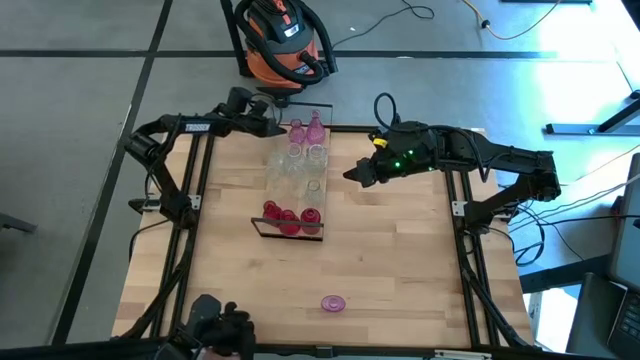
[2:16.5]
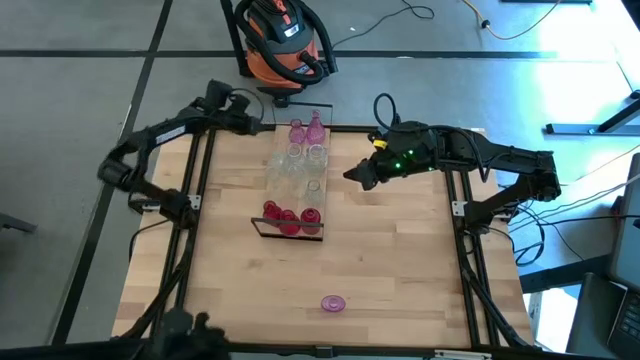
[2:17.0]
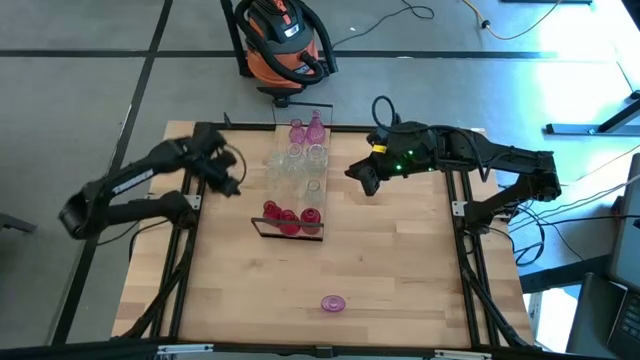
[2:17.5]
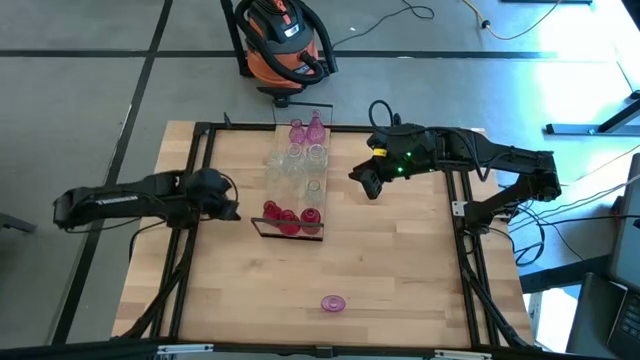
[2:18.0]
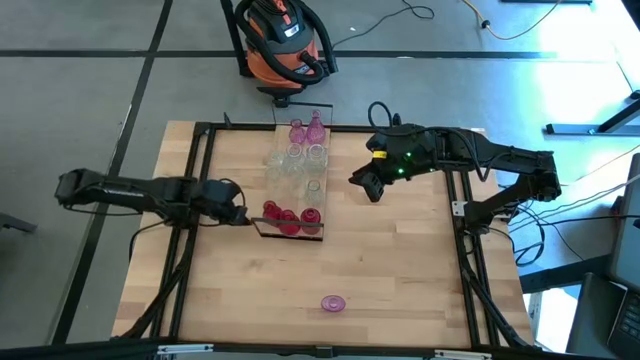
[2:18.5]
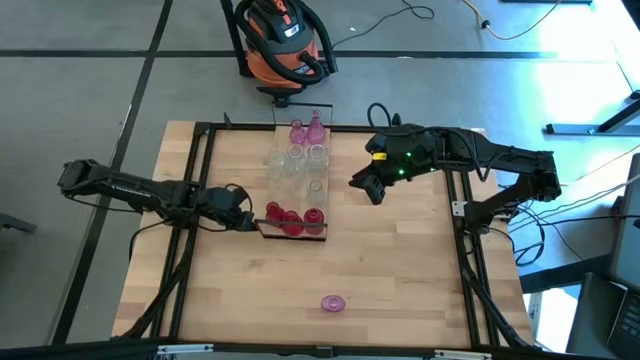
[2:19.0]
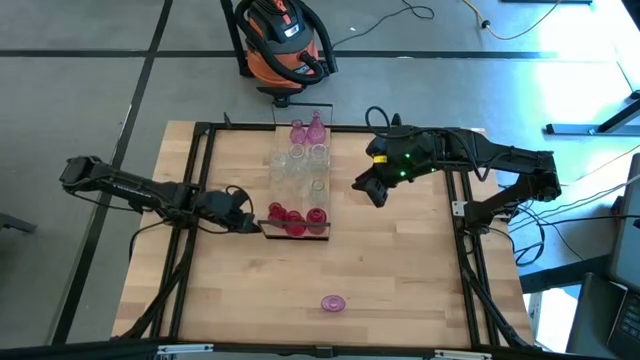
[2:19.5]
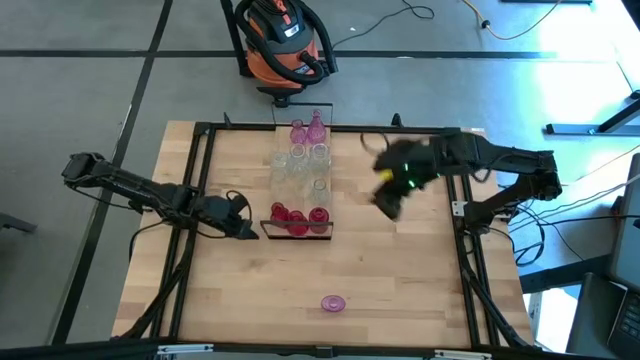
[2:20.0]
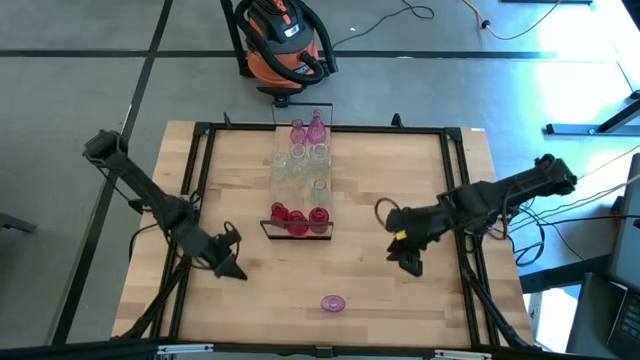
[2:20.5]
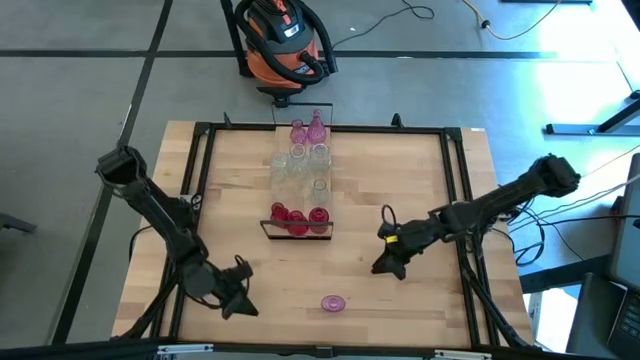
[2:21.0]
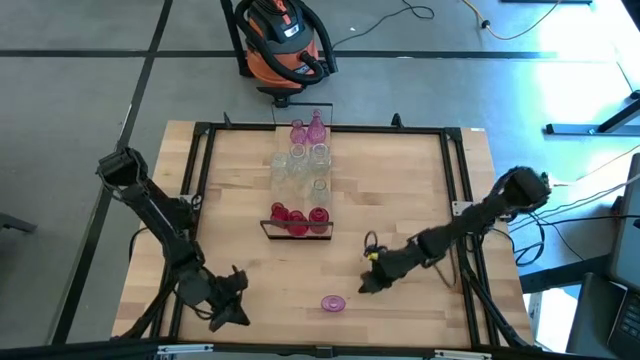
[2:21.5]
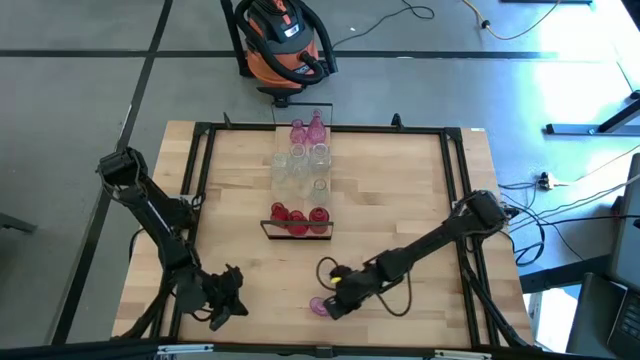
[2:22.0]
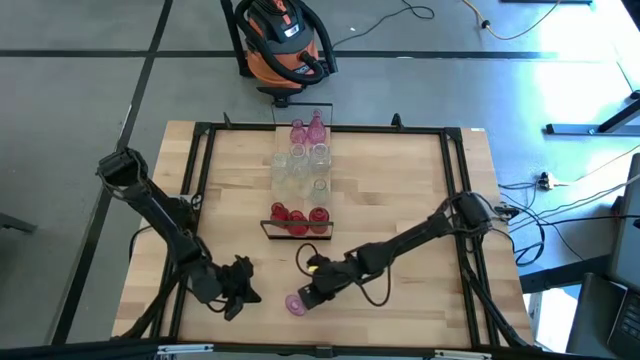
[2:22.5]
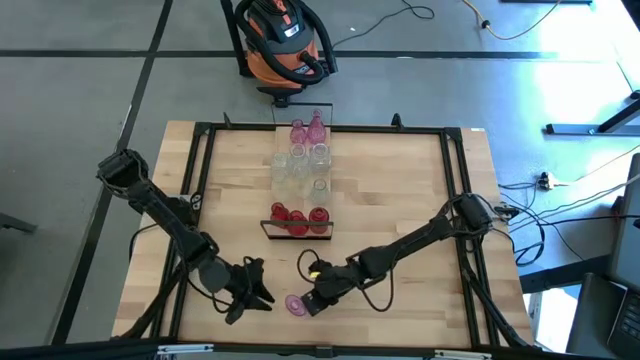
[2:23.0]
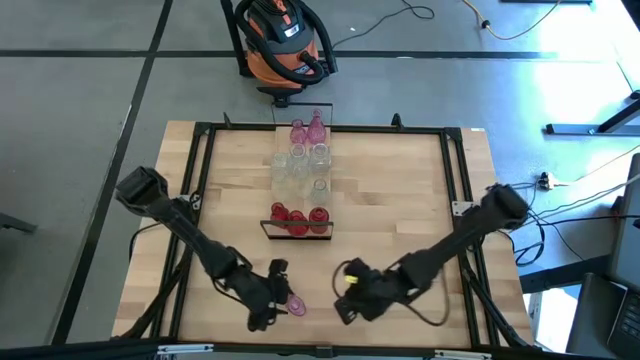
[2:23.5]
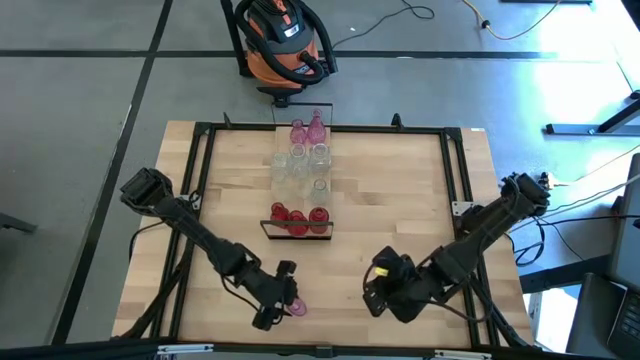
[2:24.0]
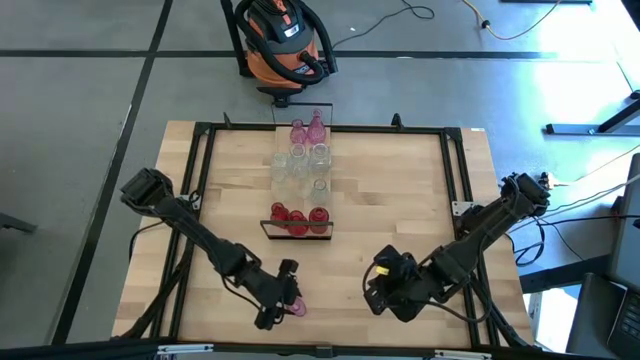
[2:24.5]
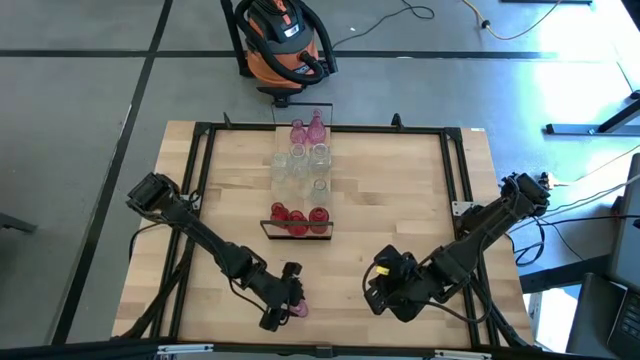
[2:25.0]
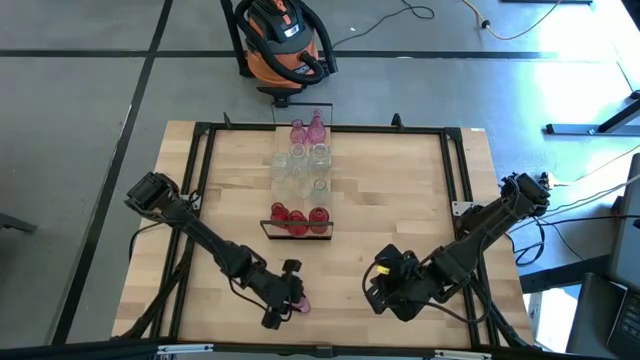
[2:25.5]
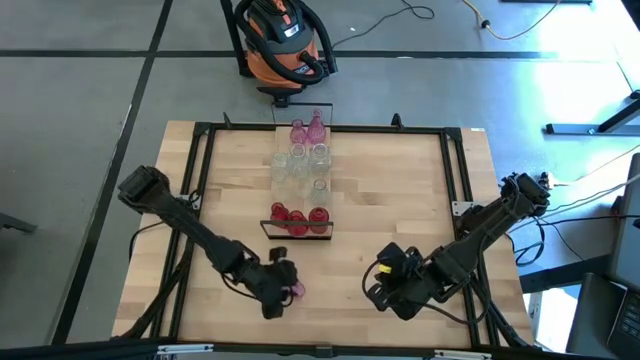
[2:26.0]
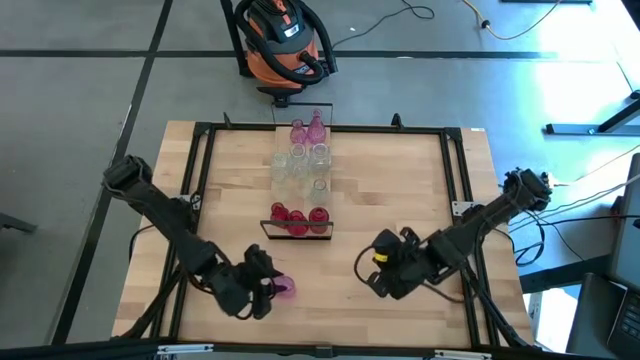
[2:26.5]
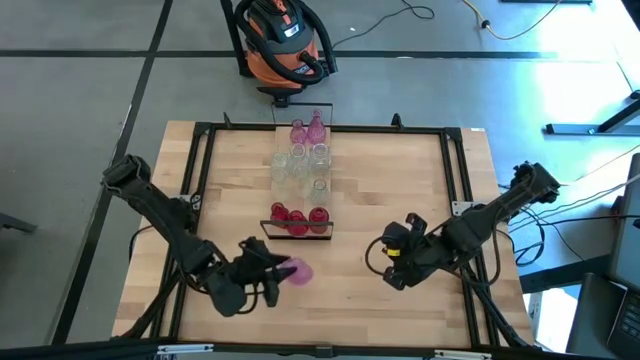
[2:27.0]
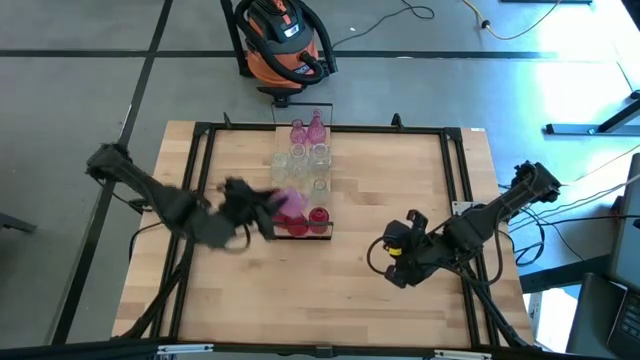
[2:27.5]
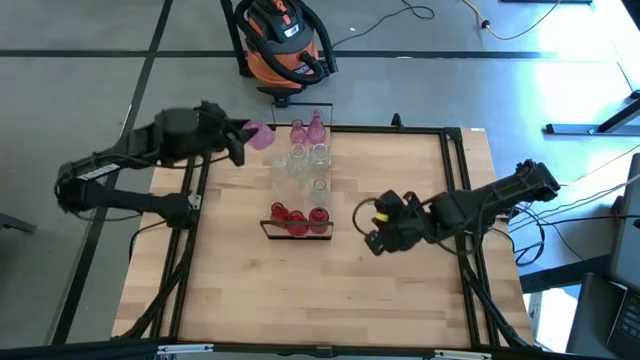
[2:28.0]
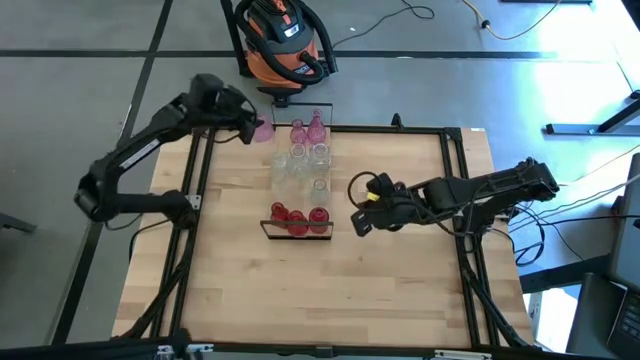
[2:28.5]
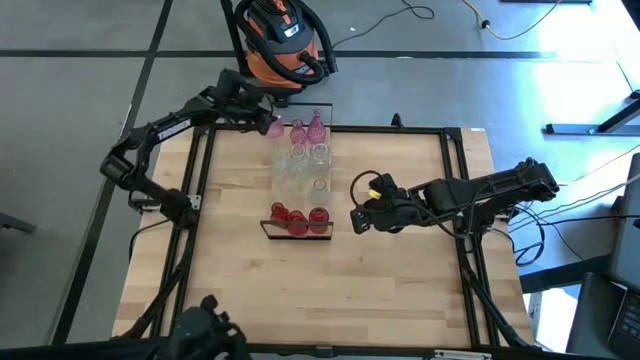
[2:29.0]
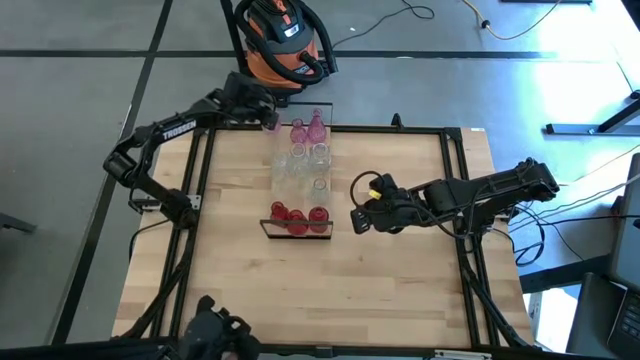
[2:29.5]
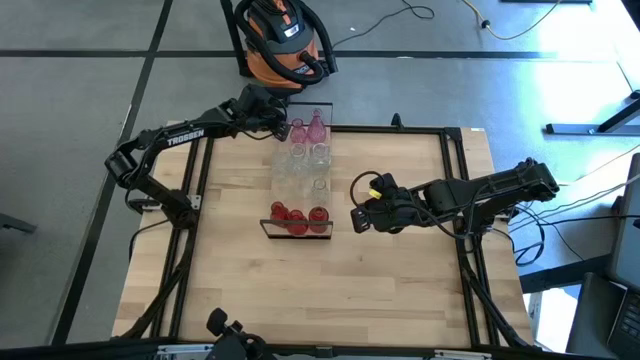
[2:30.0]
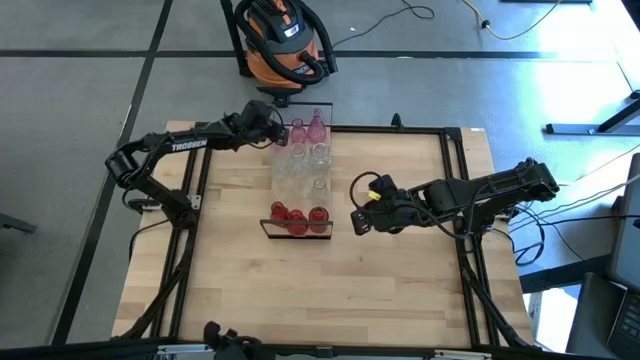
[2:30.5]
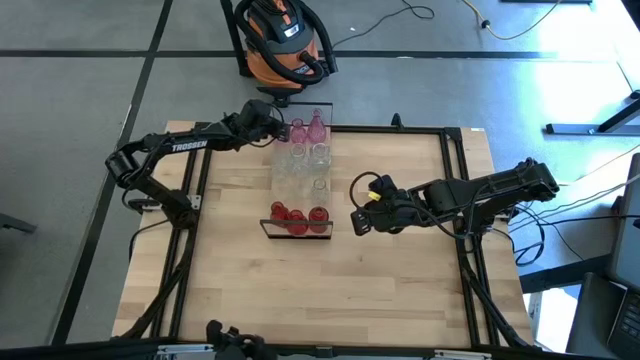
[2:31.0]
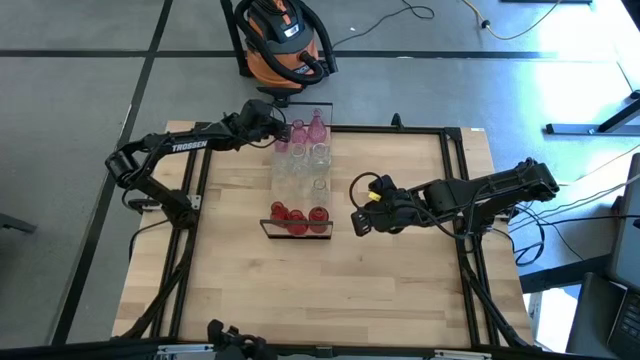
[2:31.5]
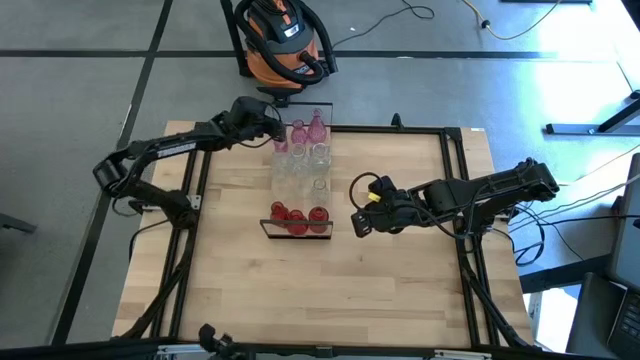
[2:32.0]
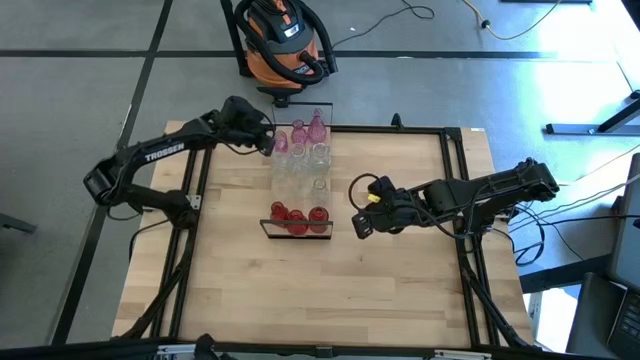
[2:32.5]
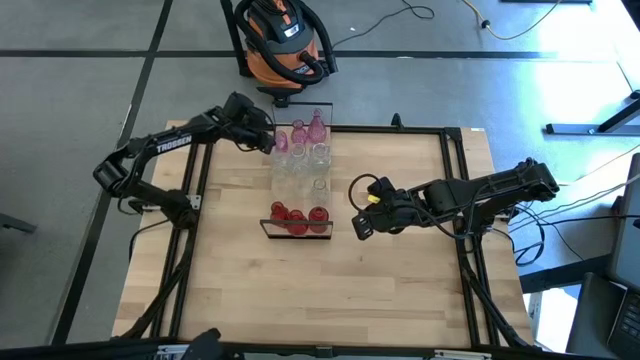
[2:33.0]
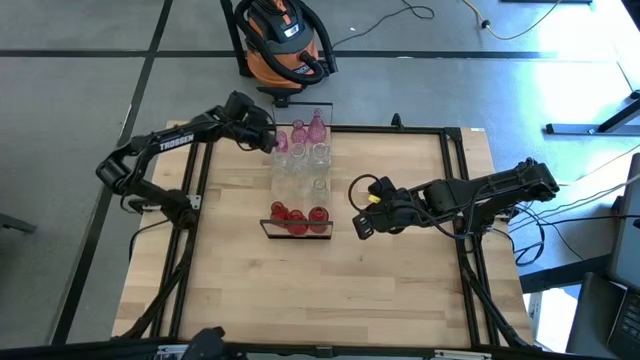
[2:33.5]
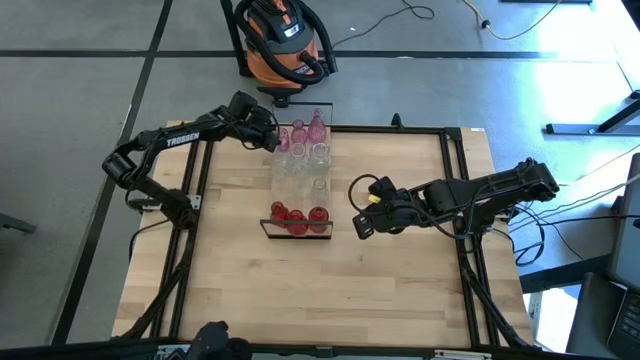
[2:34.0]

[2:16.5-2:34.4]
Task: sort vases onto shelf
Put the purple vase on the shelf

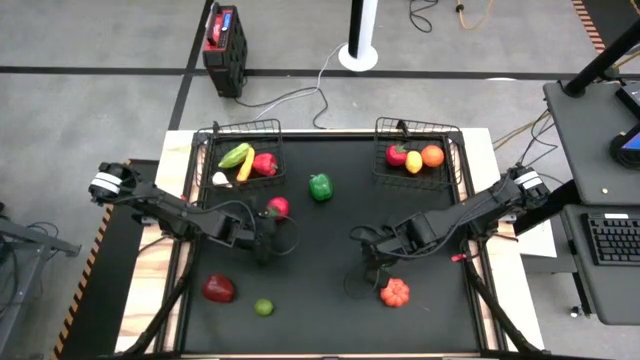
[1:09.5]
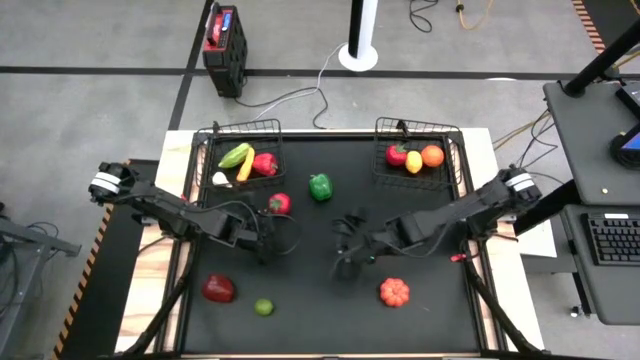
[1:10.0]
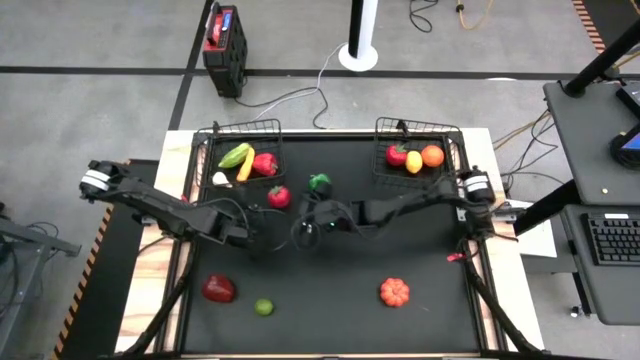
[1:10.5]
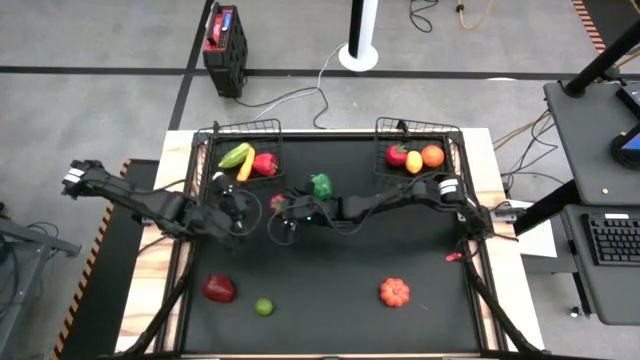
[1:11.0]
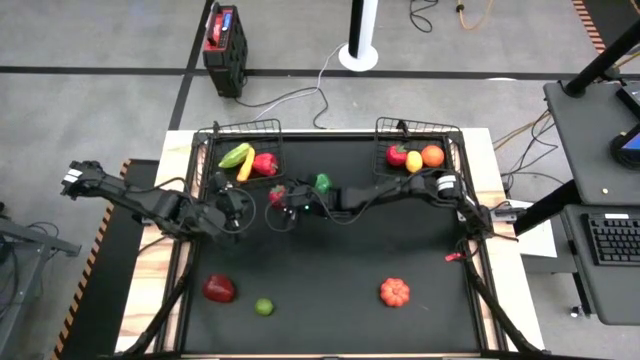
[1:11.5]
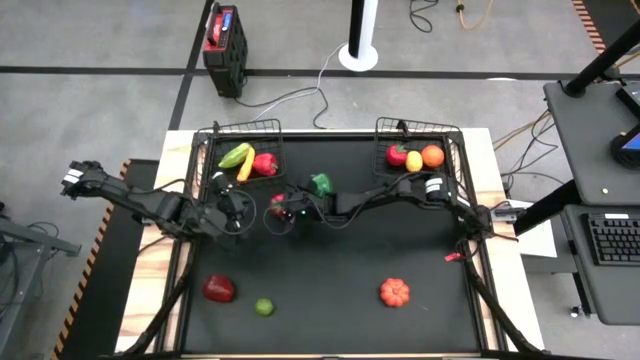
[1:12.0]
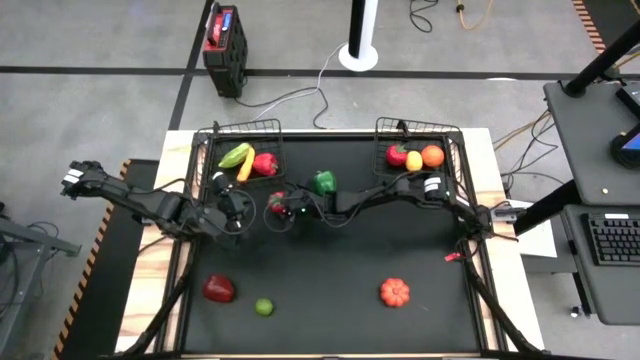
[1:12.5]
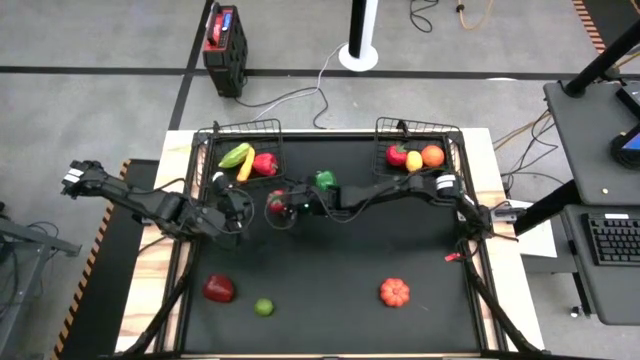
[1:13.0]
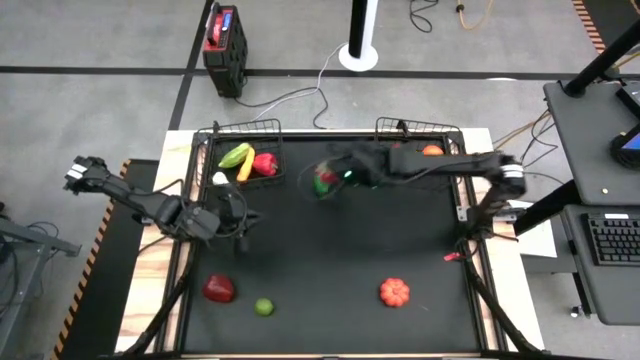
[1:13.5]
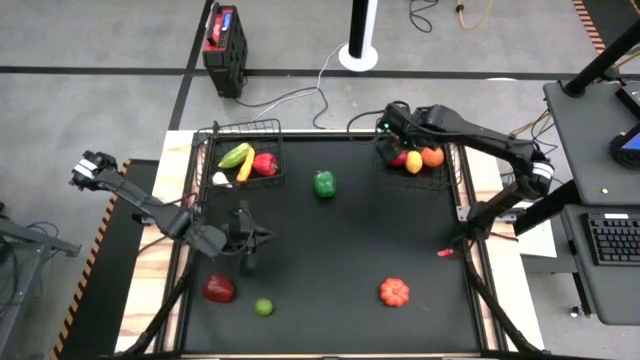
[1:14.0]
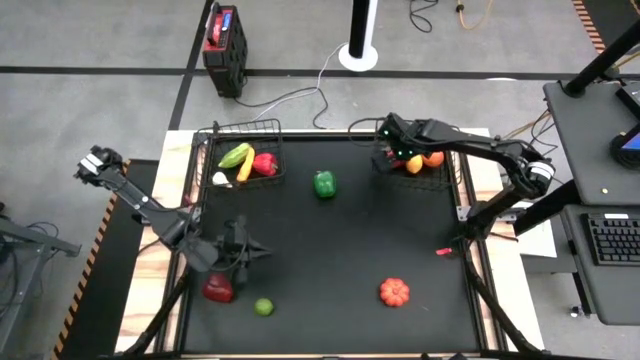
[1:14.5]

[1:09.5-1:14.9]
Task: Sort produce into baskets
Put the tomato into the right wire basket
